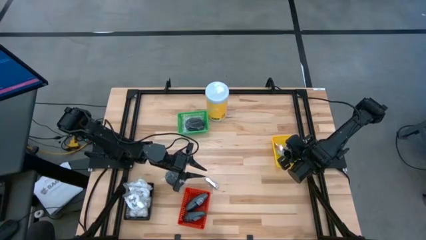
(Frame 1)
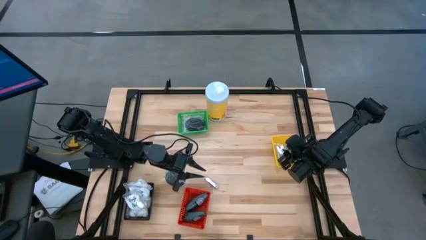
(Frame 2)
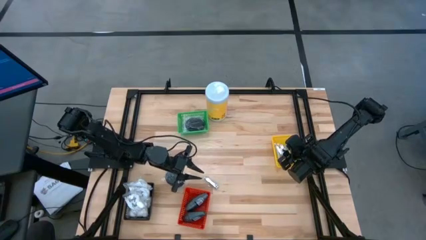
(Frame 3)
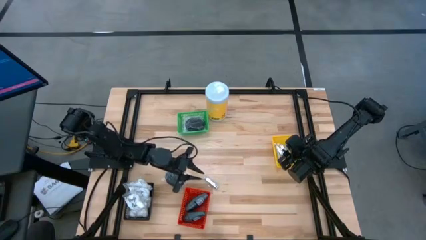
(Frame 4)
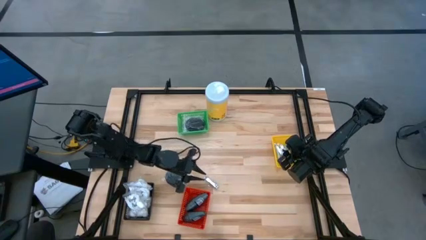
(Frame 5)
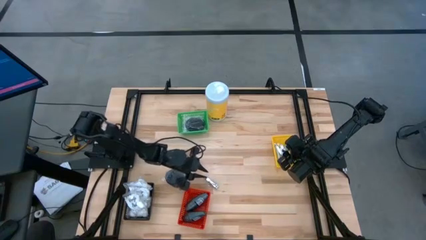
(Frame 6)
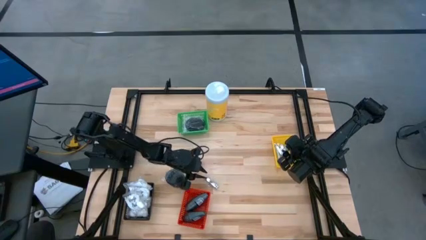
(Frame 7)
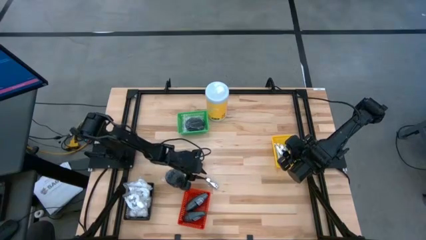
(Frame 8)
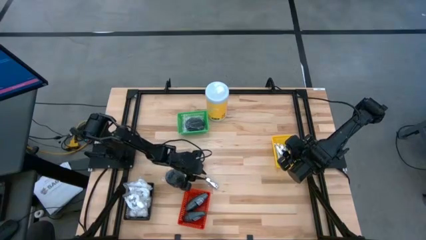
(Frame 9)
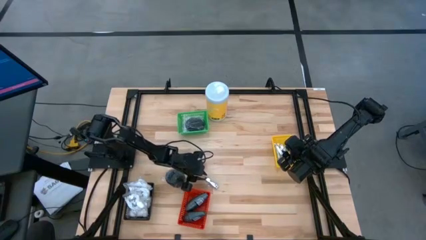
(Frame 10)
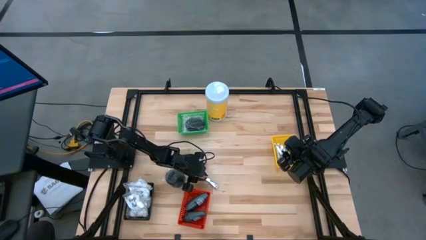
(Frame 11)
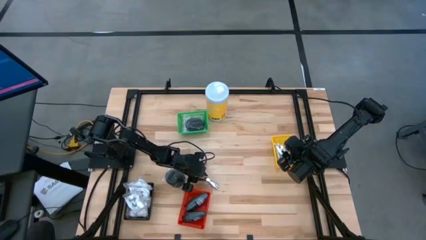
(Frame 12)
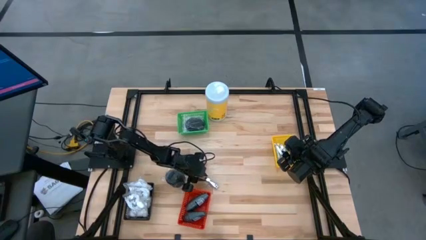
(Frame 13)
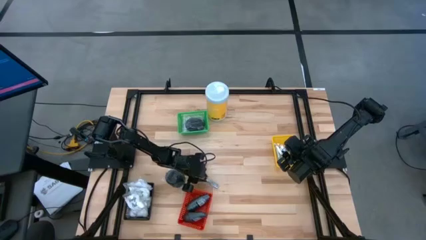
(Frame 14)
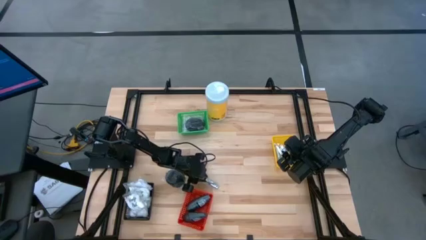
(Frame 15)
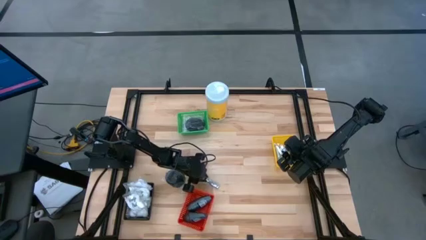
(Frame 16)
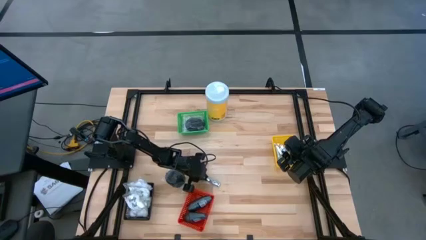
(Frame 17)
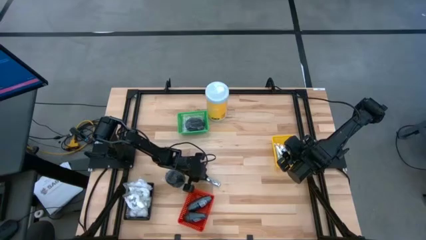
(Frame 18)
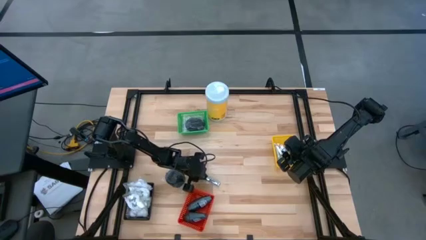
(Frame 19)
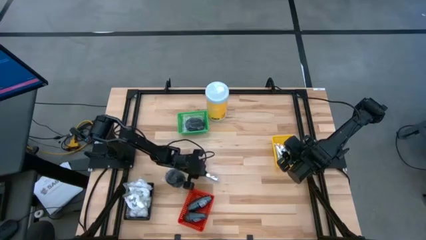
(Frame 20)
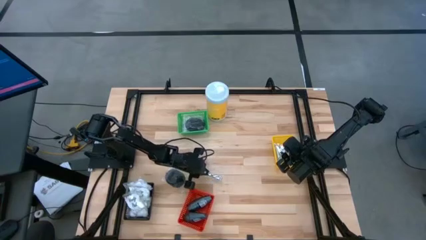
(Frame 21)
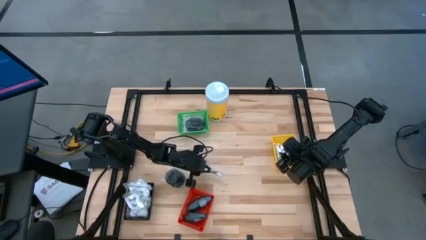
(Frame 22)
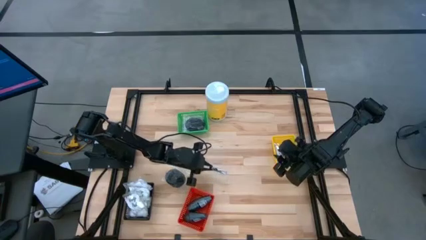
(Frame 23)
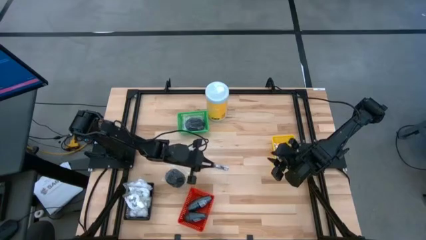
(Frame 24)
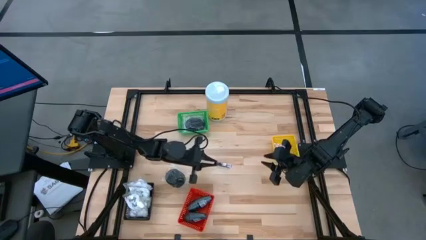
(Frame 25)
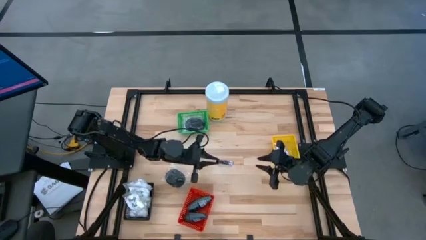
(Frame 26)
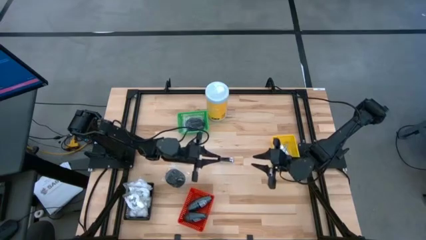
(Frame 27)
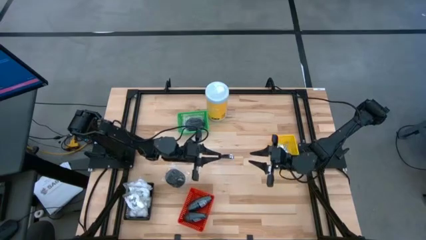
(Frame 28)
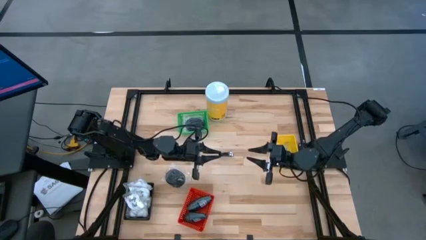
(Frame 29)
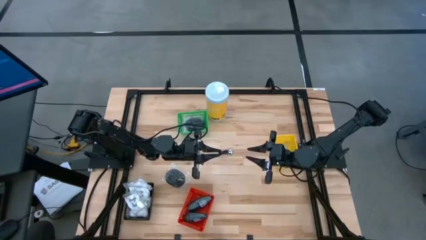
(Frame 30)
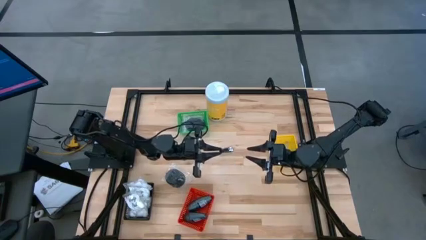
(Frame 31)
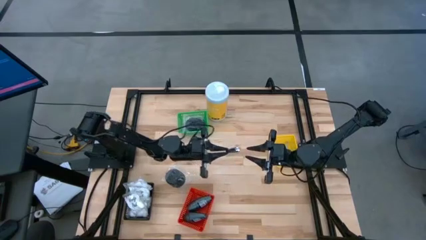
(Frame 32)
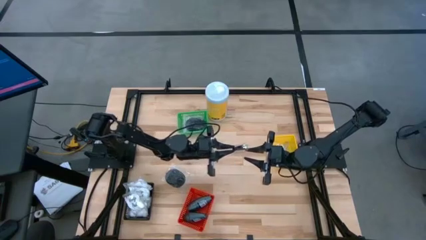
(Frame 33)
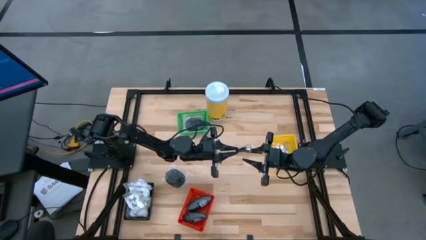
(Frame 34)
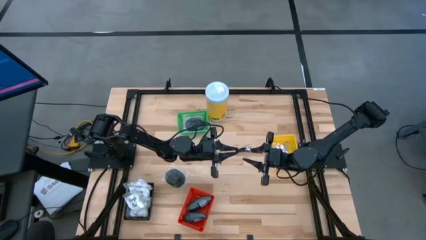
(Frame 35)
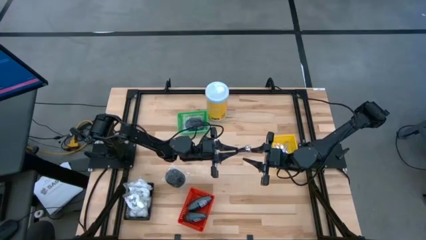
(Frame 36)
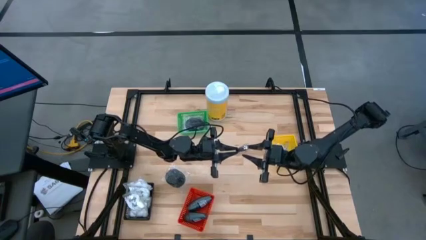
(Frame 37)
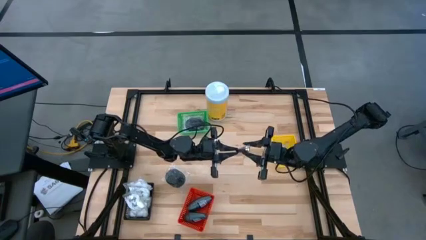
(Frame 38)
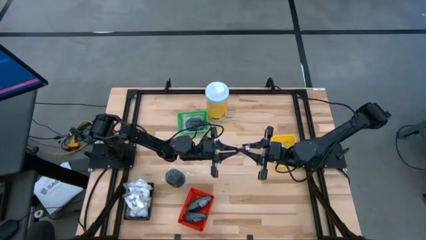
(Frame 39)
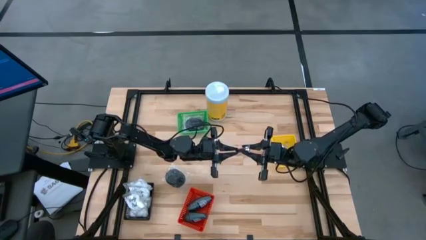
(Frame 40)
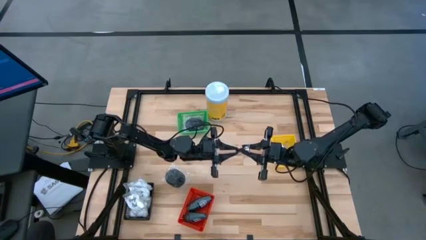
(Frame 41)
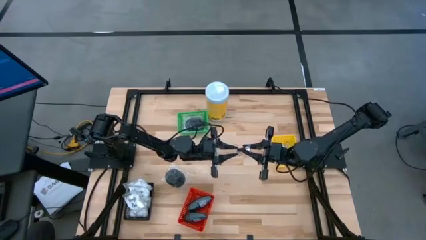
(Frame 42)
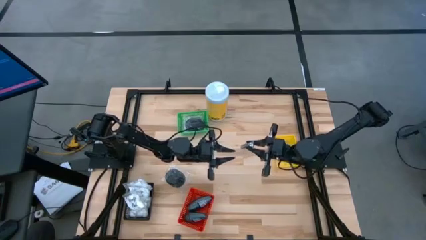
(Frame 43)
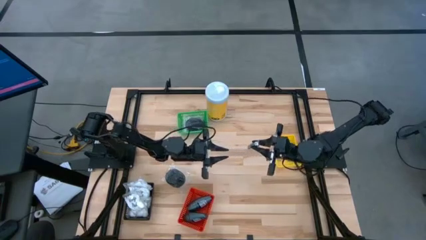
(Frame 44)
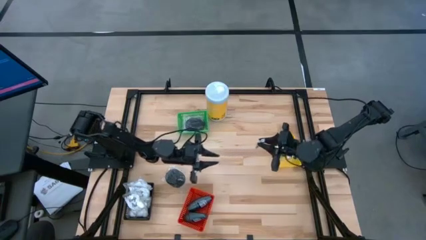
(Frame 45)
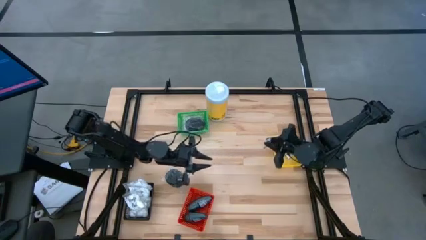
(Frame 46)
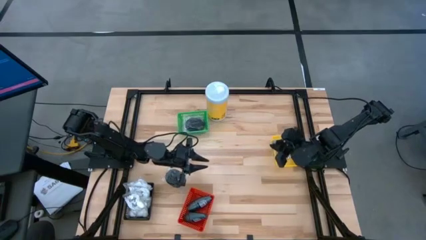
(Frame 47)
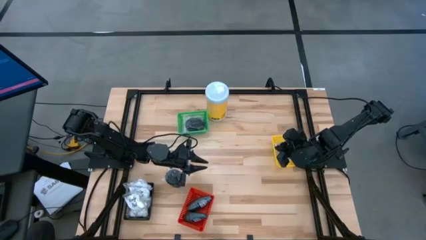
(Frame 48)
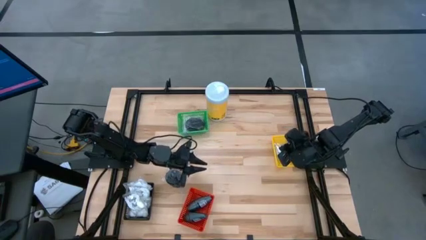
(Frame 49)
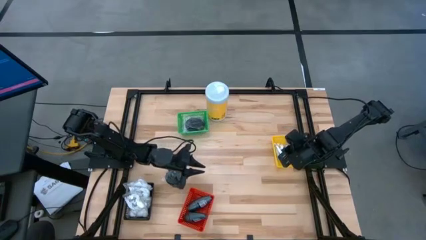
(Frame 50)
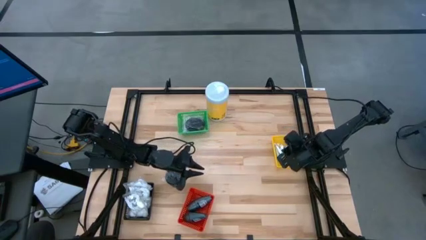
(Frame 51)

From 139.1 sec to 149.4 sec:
Task: Pick & Place Travel size toiletries
Put the silver nail cutter into the yellow bin

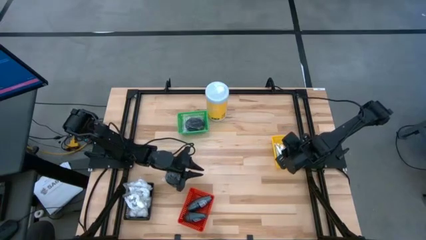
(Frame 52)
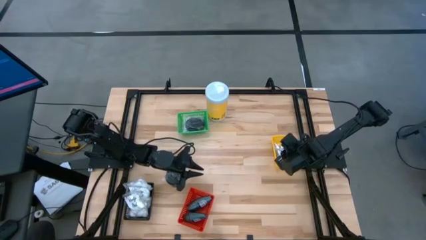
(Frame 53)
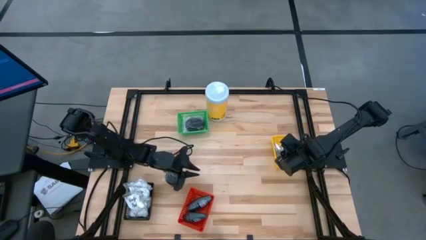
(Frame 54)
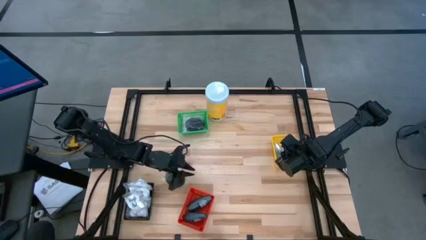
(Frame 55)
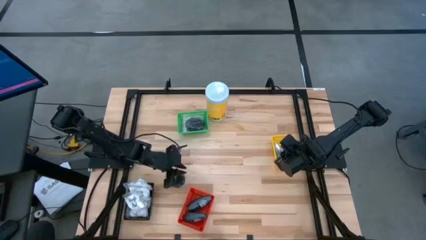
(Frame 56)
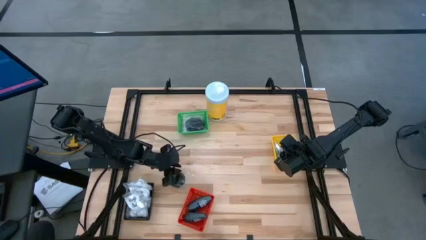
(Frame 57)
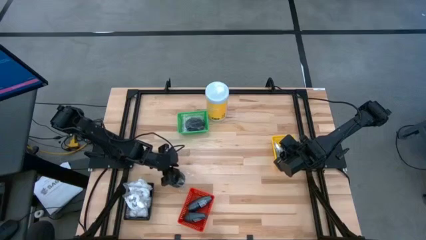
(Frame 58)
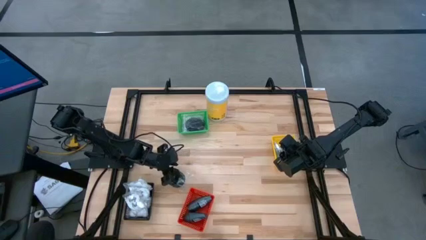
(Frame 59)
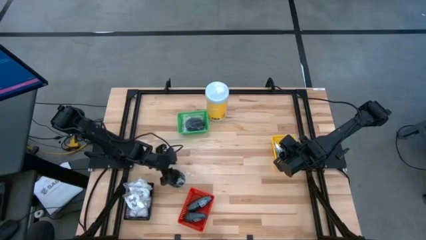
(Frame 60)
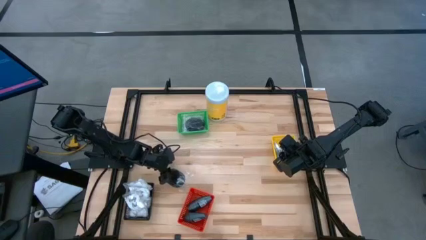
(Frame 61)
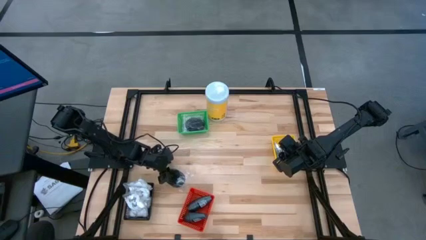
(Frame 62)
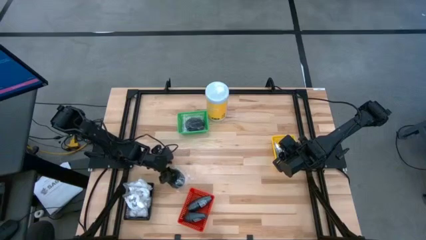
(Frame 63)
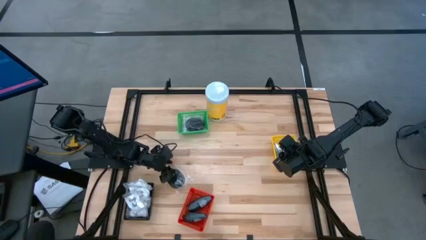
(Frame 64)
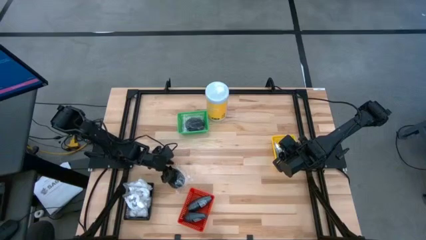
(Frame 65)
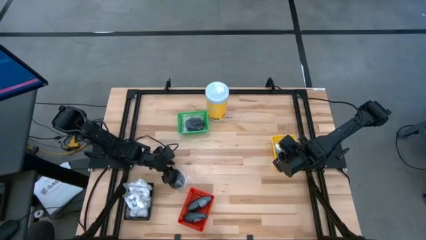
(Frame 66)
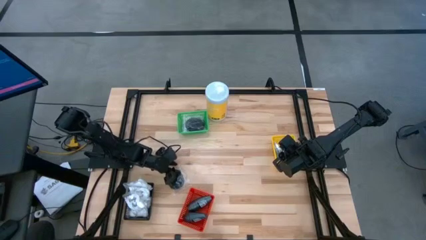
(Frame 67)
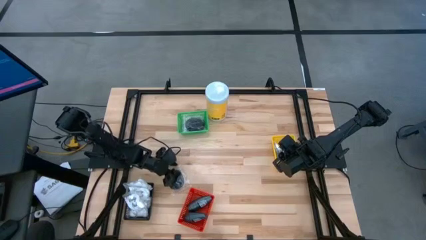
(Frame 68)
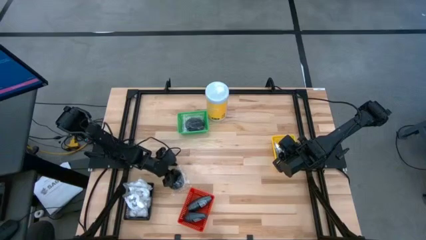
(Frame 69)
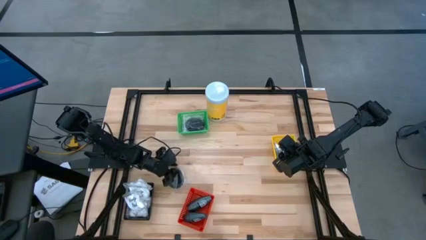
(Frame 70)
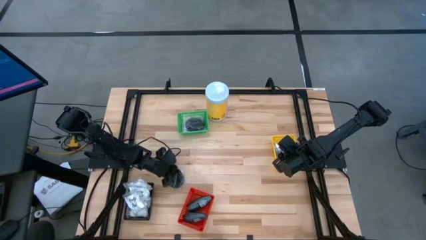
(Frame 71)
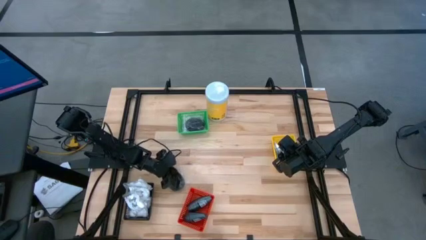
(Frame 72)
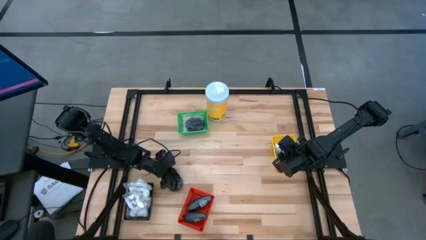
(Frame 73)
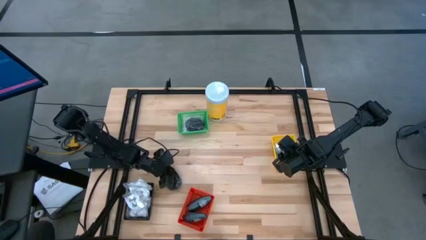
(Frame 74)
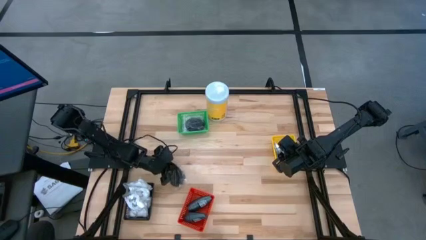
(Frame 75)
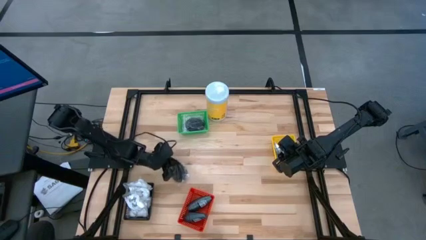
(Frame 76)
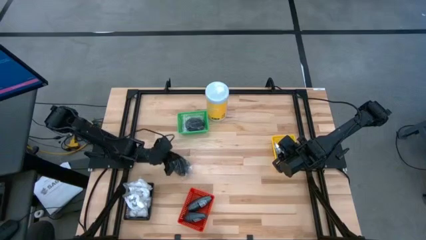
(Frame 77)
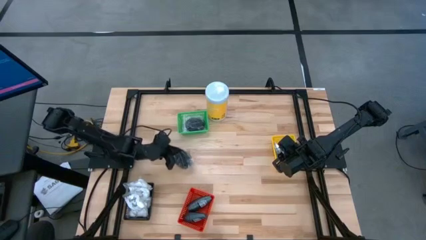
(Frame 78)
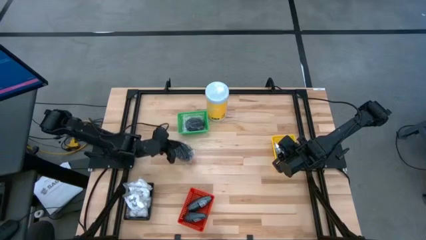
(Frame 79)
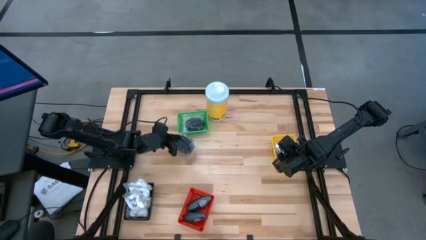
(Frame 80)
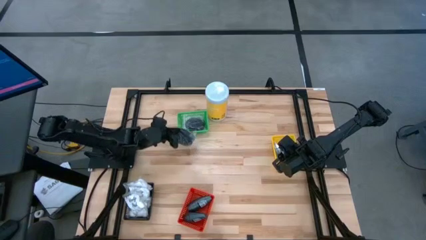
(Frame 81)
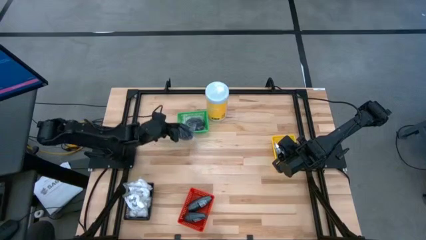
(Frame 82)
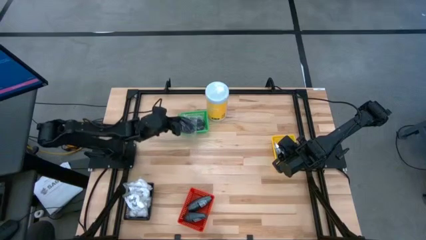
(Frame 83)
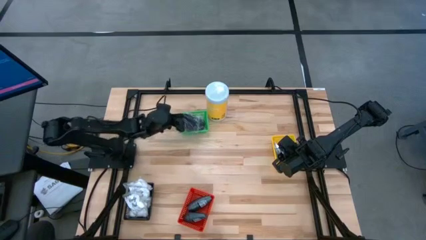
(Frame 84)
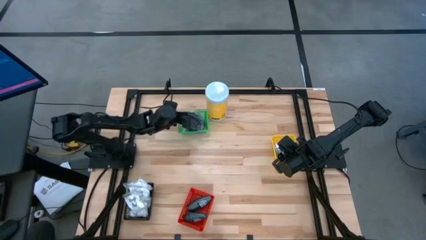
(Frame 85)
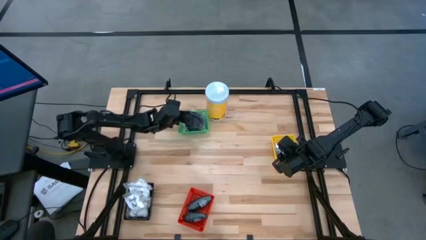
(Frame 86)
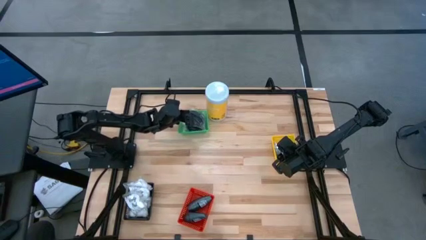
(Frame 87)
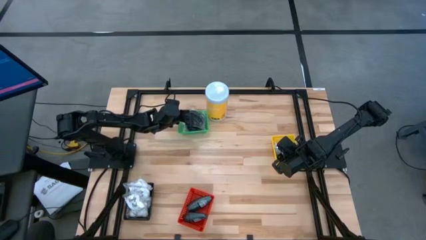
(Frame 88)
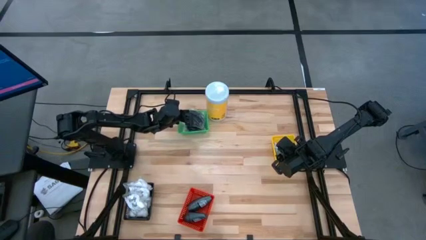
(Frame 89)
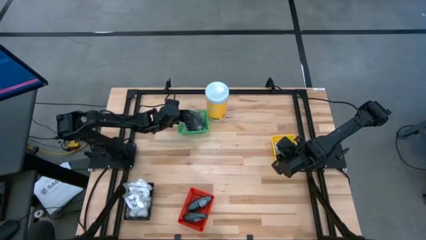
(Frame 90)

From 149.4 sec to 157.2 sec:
Put the black hairbrush into the green bin
